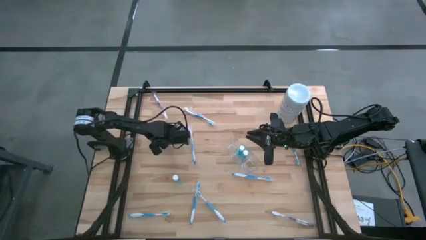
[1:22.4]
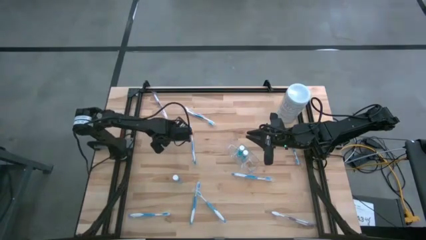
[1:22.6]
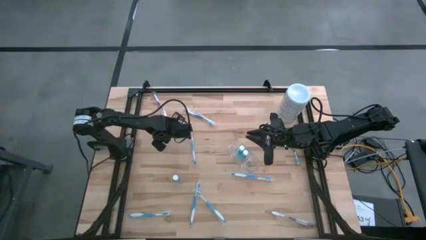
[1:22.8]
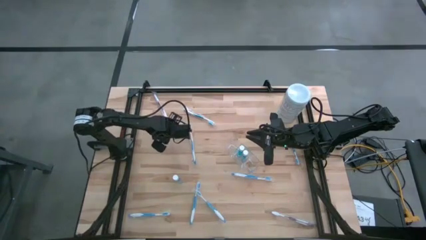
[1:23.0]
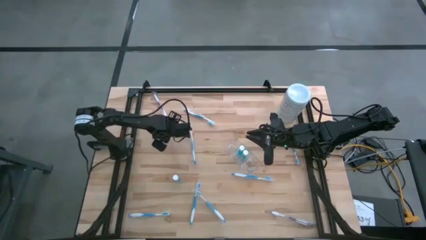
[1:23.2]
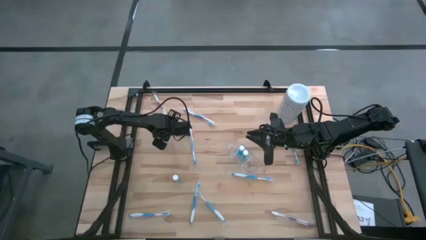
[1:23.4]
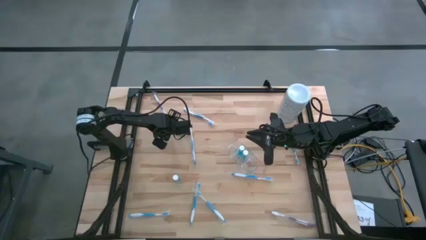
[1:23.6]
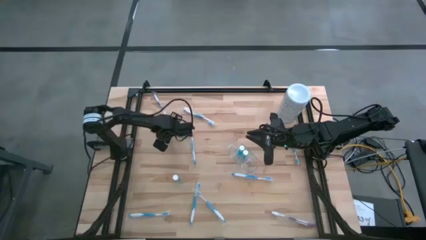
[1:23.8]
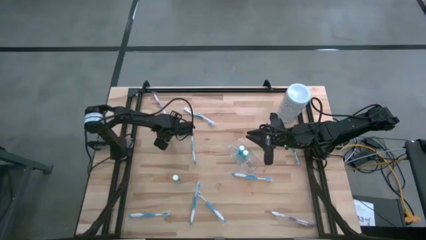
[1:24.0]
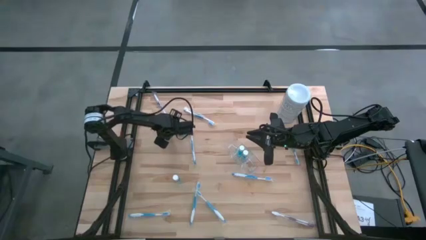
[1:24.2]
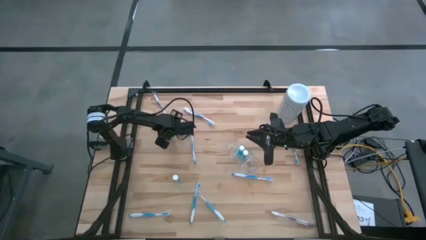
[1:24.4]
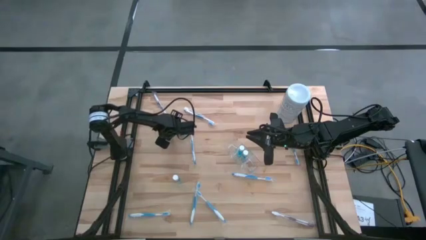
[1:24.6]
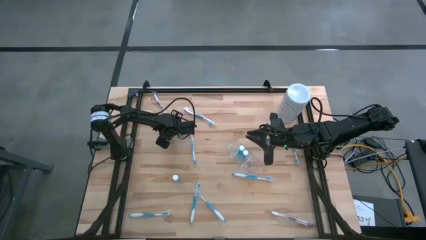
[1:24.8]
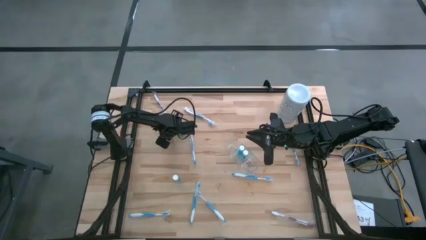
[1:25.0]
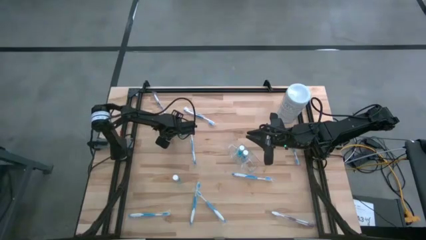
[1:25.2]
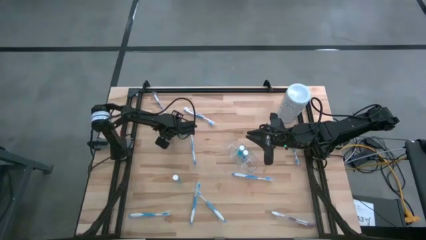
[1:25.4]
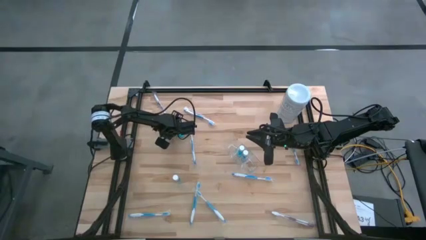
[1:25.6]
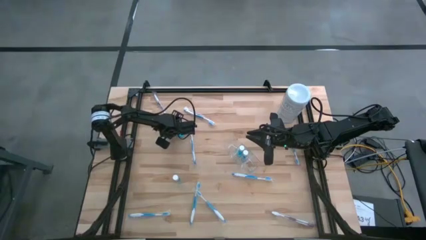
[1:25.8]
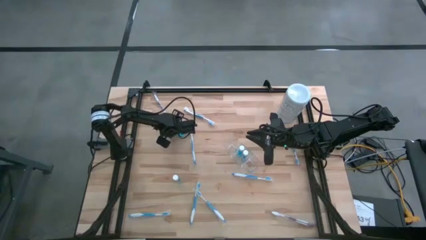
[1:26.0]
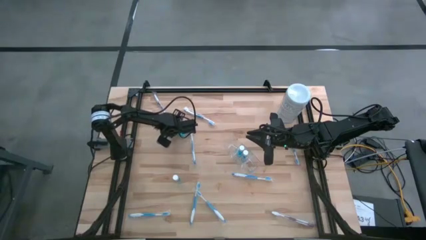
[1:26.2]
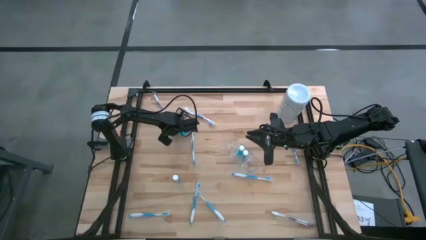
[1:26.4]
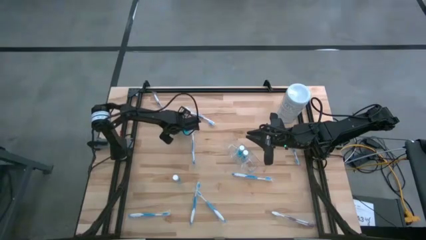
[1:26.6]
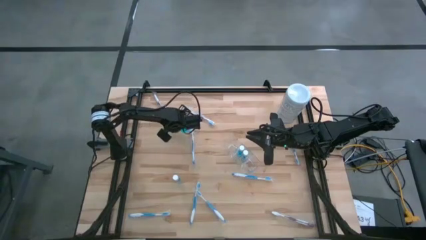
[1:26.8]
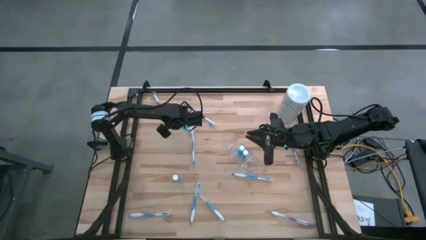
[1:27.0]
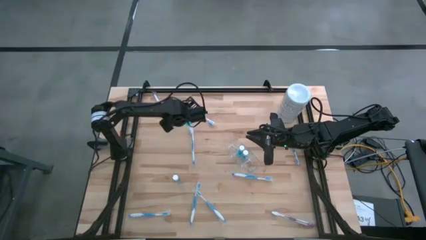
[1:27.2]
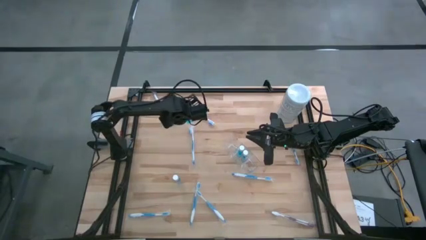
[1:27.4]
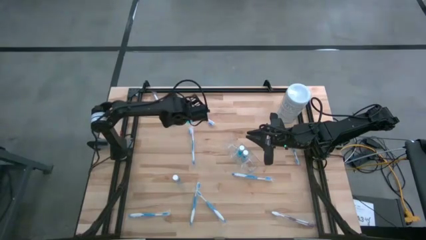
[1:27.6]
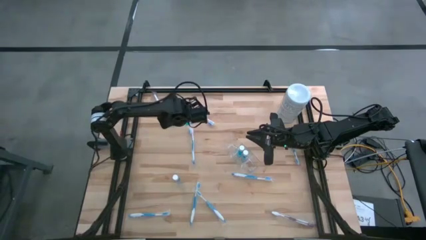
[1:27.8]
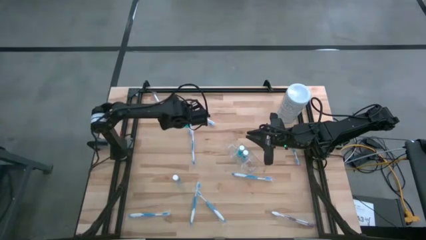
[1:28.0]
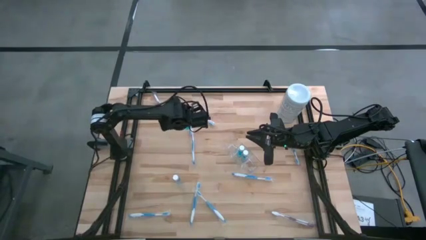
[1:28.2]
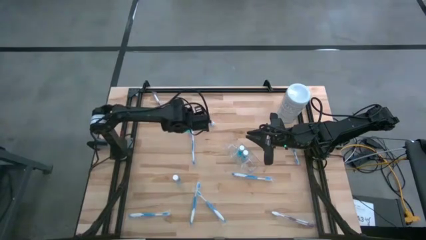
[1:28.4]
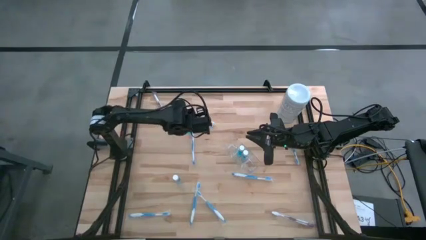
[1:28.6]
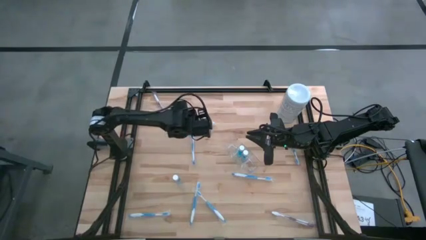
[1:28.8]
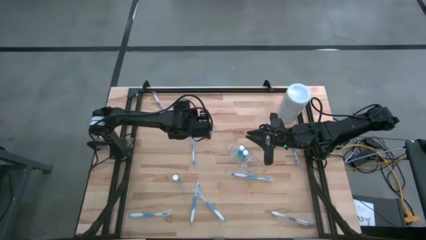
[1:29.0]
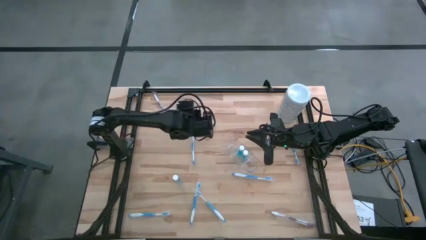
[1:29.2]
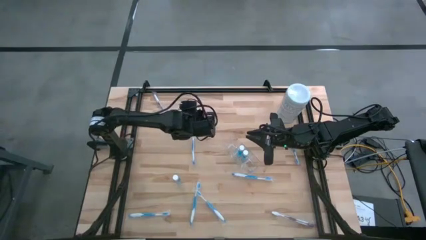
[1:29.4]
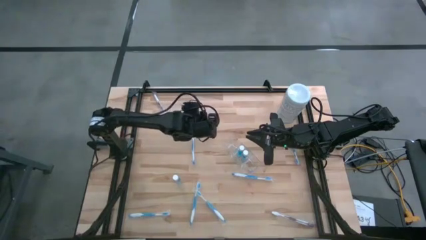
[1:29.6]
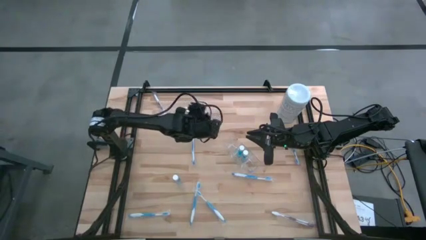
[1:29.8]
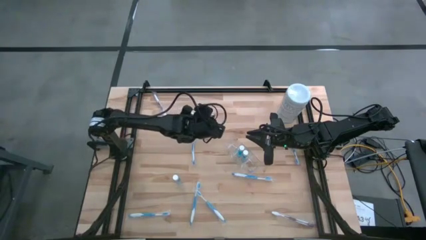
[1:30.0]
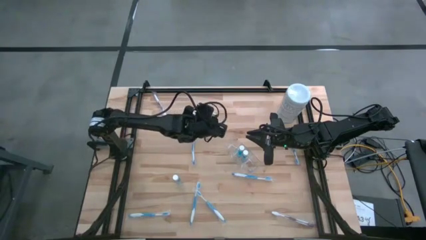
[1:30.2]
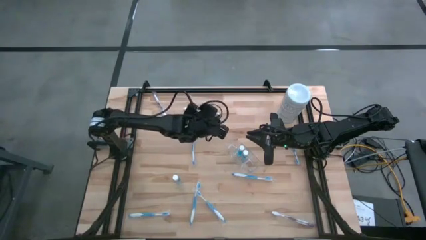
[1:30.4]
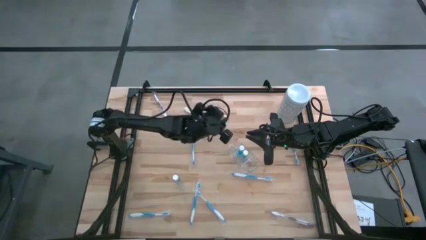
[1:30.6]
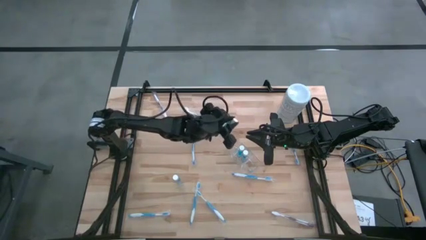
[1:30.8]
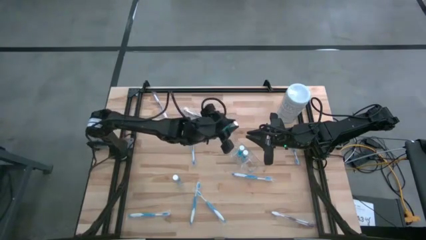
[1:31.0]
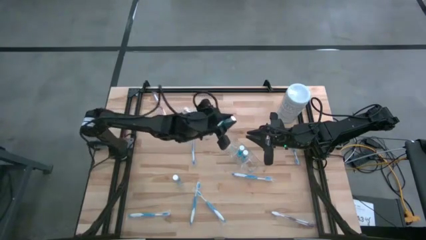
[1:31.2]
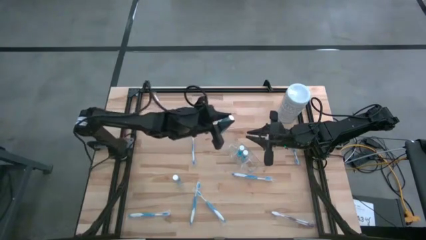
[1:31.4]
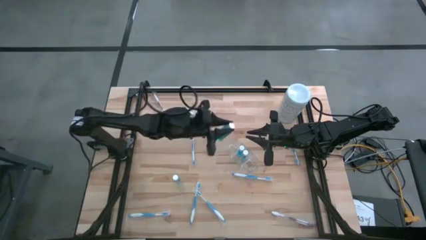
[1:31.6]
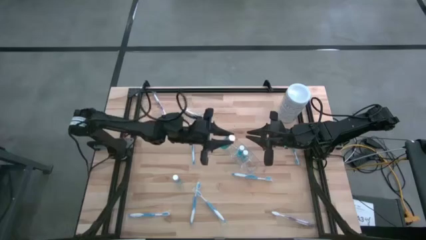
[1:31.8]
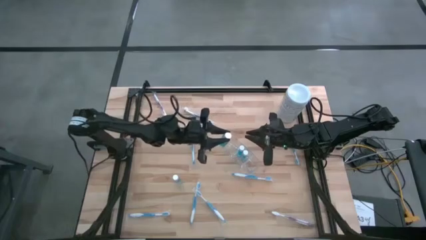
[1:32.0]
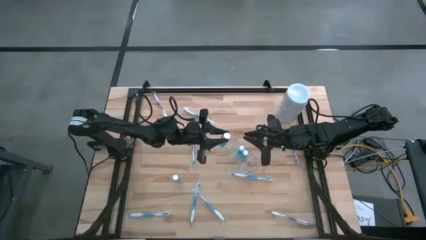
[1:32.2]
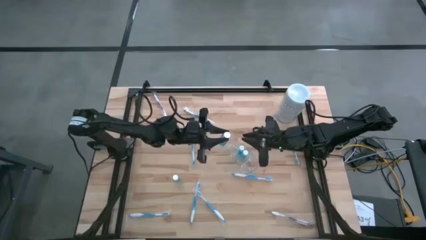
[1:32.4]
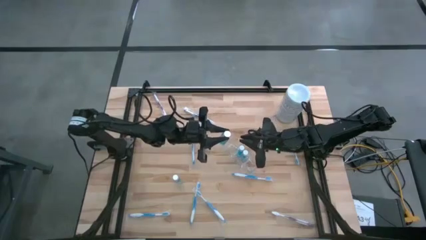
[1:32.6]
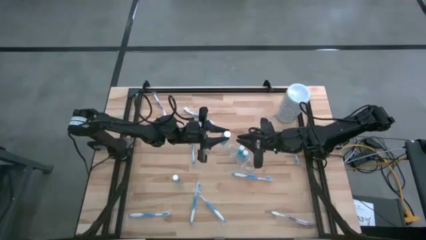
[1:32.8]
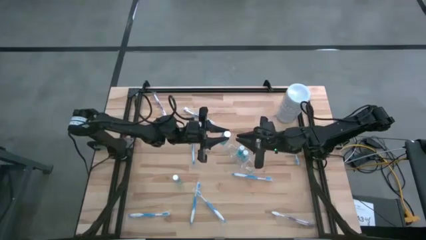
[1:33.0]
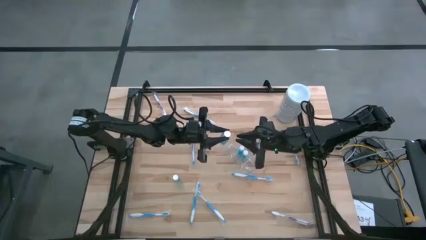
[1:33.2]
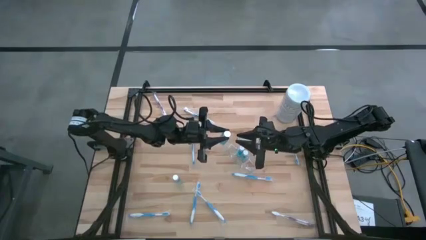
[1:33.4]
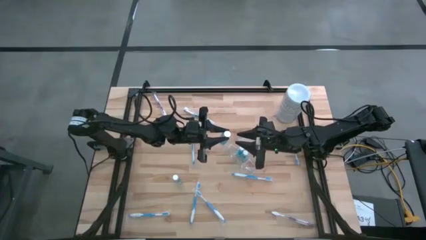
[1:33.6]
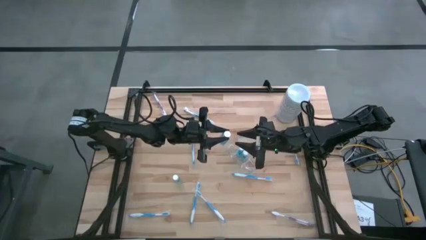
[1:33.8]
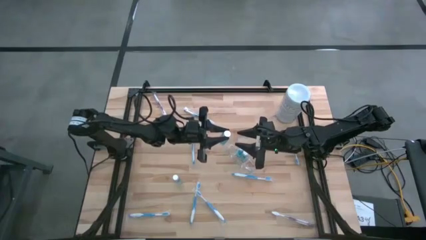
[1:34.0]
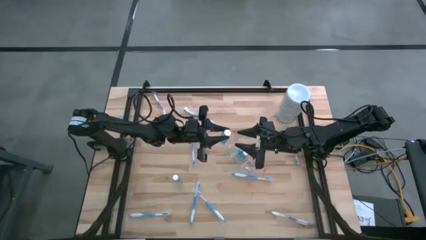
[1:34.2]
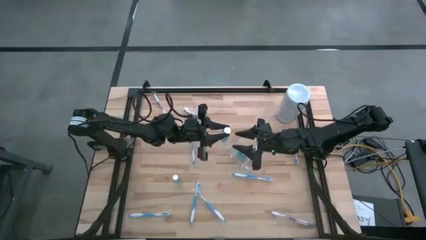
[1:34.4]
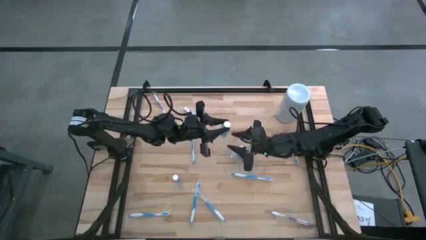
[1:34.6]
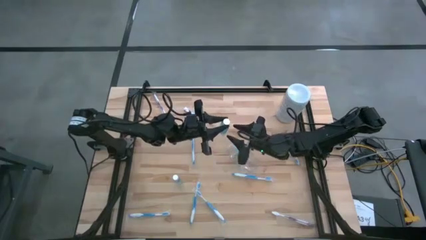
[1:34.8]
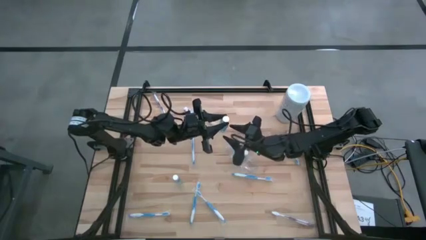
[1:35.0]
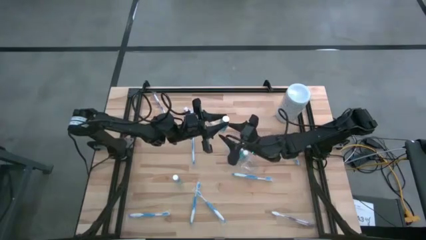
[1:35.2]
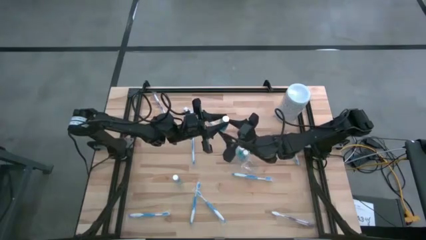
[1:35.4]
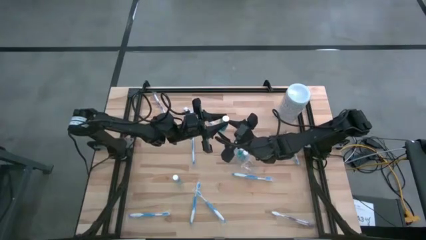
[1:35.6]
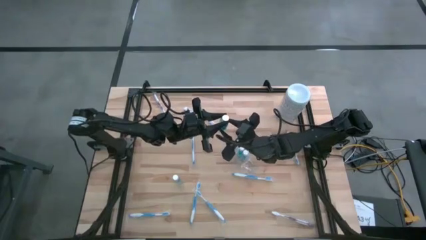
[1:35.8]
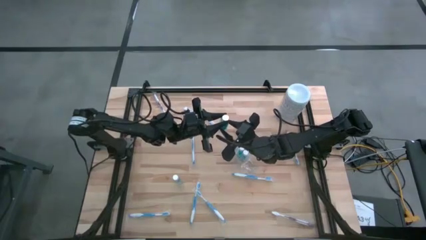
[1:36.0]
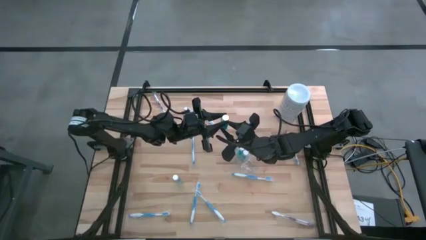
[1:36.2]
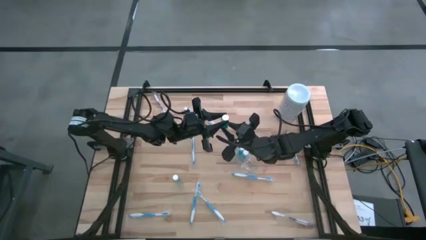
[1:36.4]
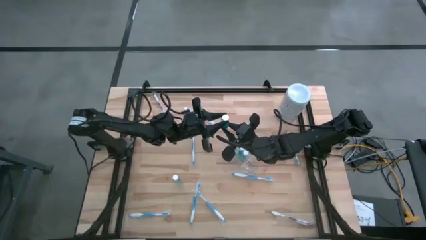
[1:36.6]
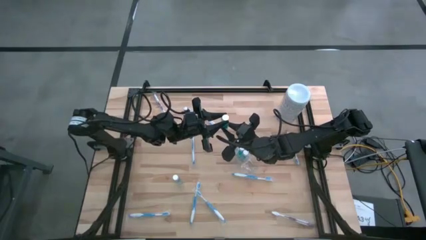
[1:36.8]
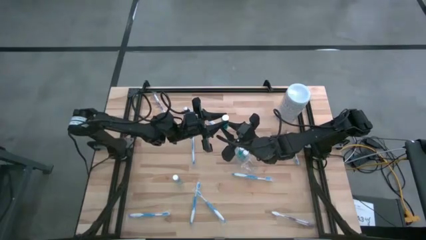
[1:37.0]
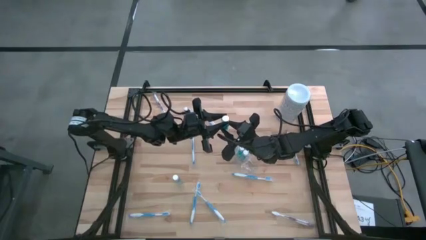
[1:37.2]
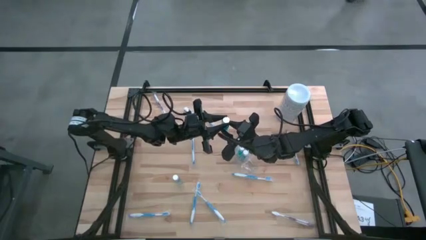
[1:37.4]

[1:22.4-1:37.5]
Task: Pick & Place toothbrushing station
Put the blue mouthwash into the middle section of the transparent organizer
